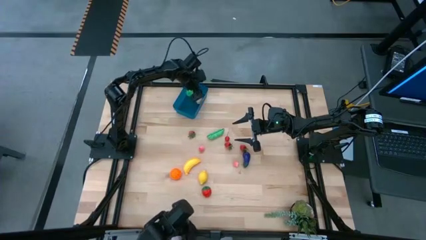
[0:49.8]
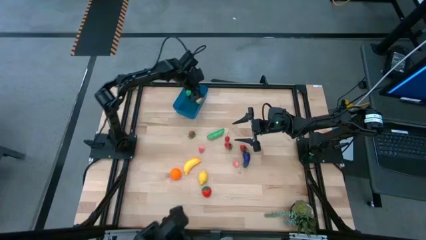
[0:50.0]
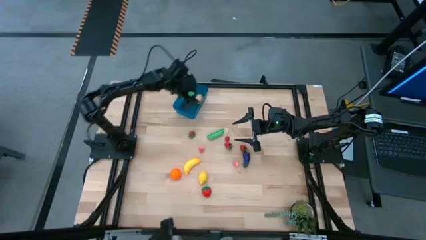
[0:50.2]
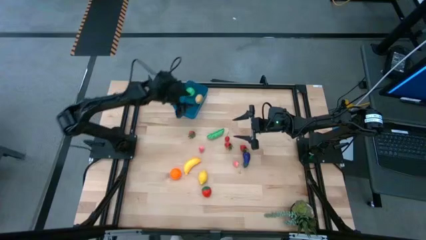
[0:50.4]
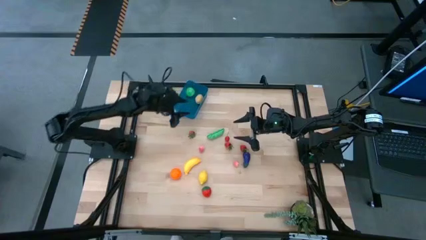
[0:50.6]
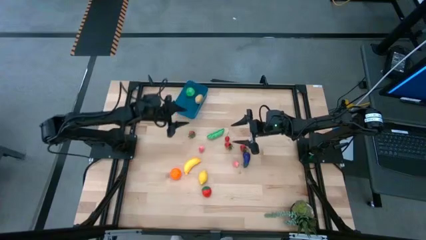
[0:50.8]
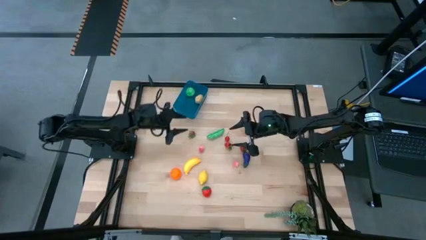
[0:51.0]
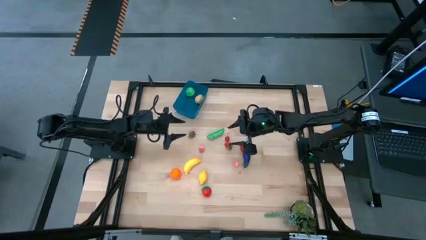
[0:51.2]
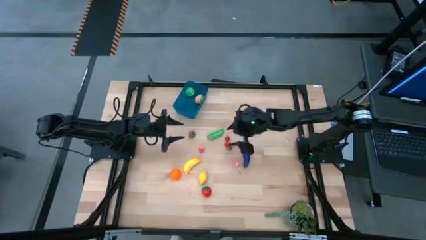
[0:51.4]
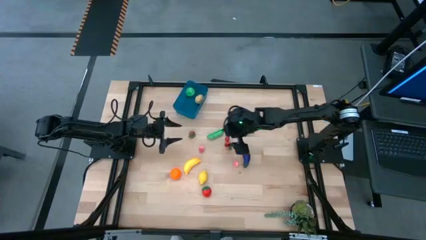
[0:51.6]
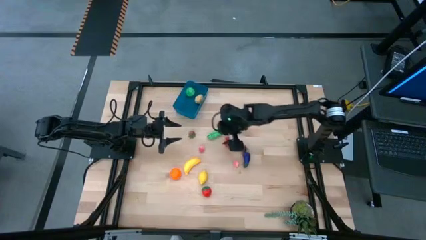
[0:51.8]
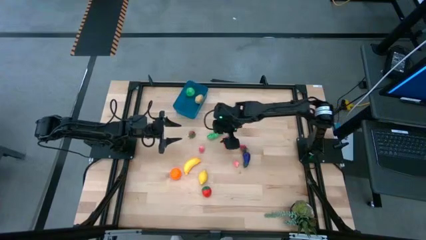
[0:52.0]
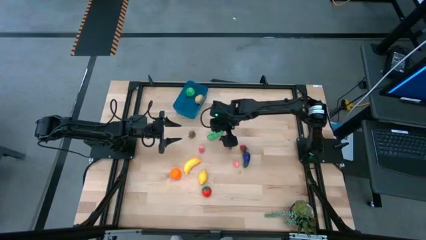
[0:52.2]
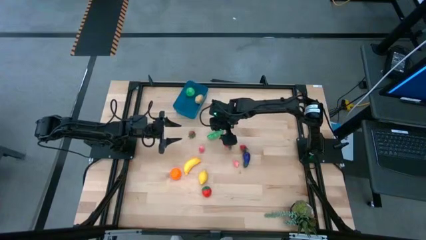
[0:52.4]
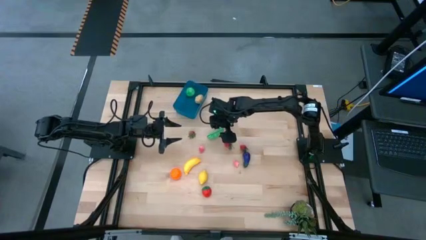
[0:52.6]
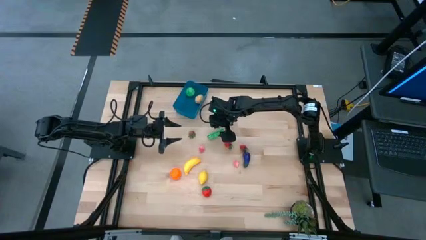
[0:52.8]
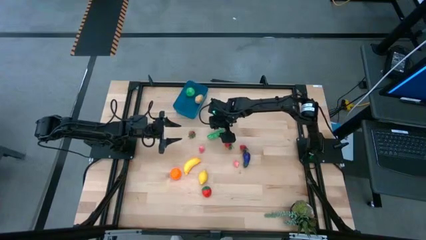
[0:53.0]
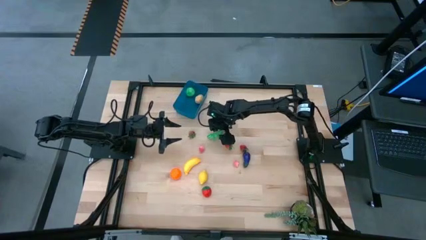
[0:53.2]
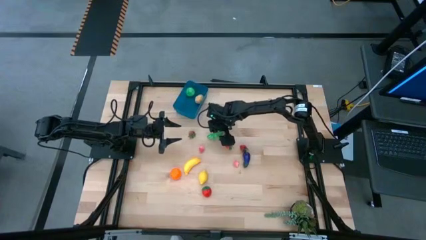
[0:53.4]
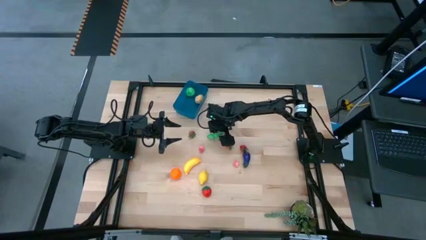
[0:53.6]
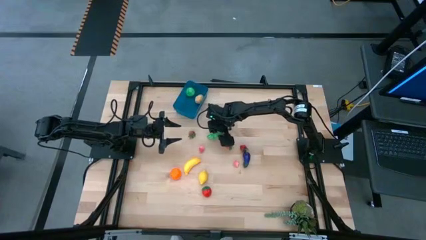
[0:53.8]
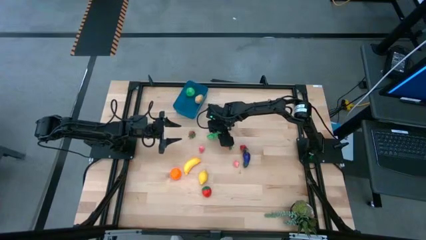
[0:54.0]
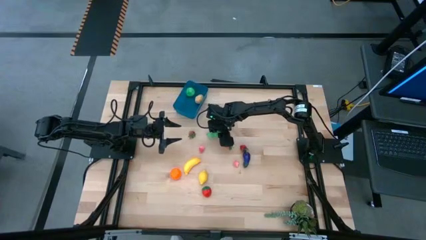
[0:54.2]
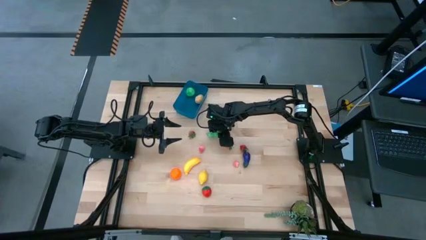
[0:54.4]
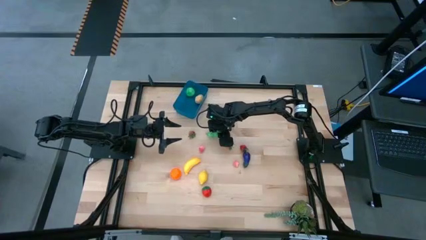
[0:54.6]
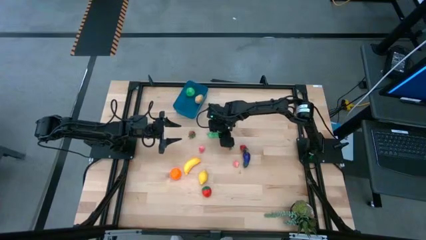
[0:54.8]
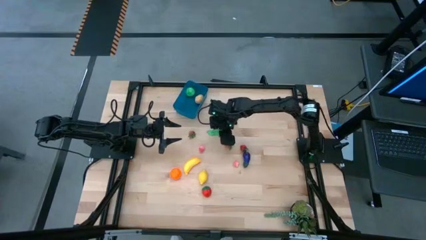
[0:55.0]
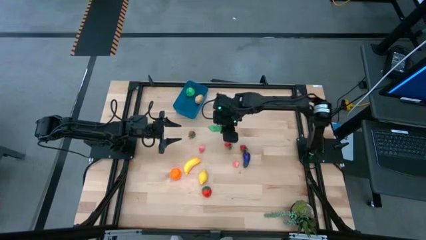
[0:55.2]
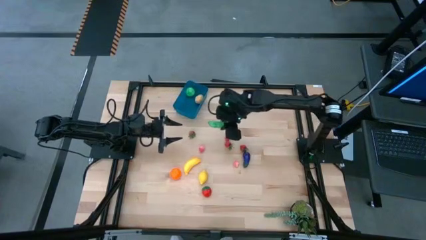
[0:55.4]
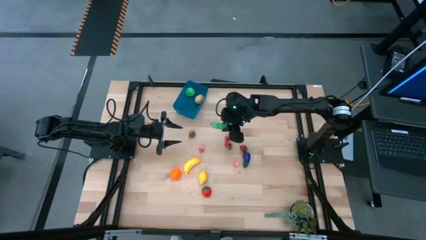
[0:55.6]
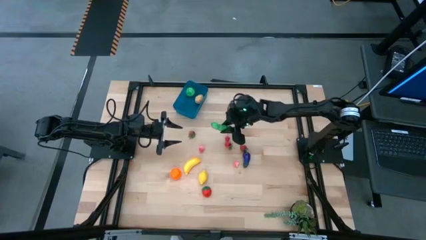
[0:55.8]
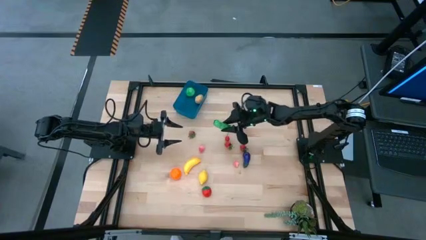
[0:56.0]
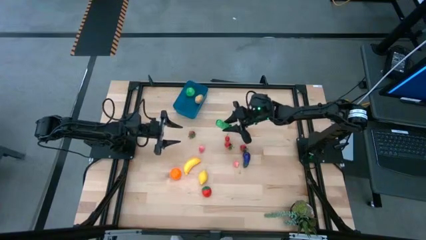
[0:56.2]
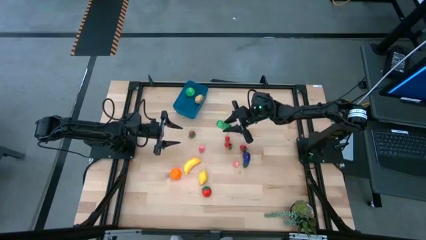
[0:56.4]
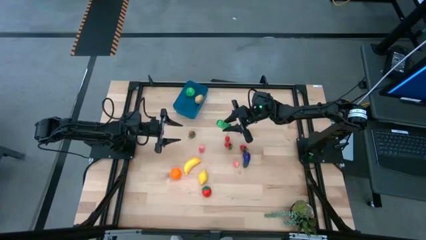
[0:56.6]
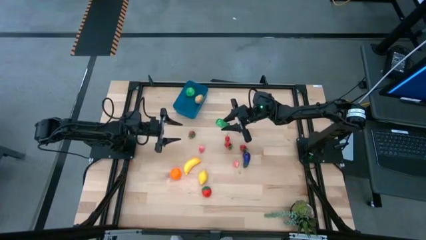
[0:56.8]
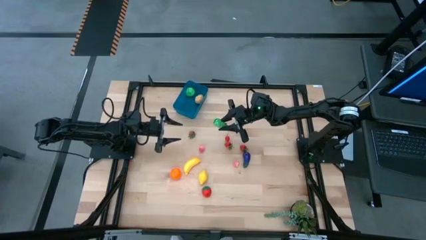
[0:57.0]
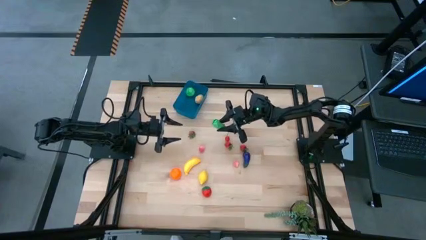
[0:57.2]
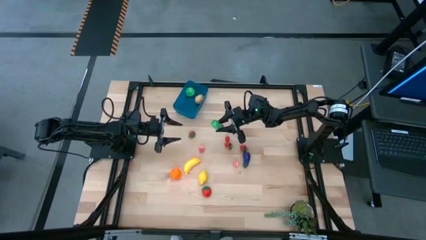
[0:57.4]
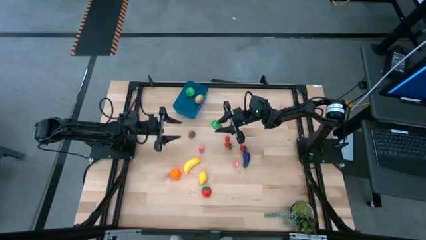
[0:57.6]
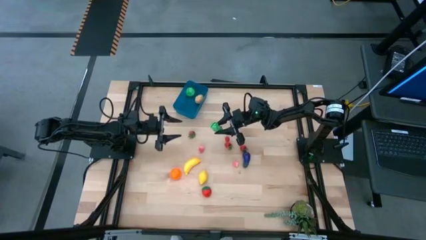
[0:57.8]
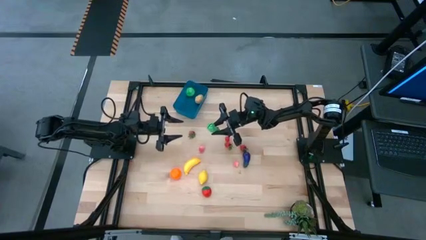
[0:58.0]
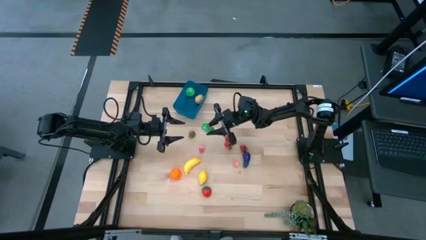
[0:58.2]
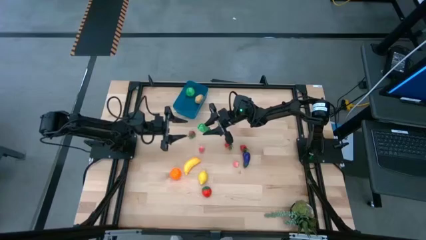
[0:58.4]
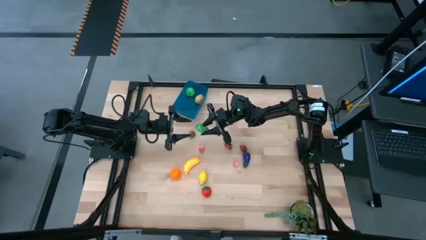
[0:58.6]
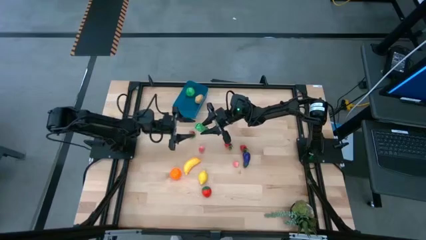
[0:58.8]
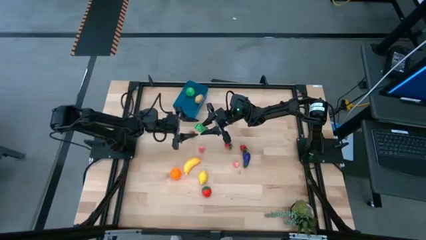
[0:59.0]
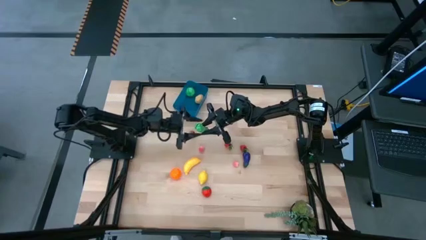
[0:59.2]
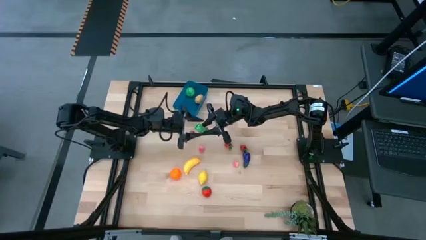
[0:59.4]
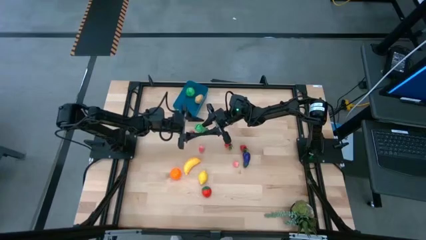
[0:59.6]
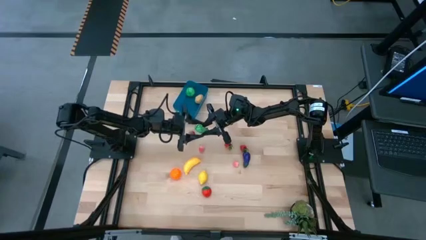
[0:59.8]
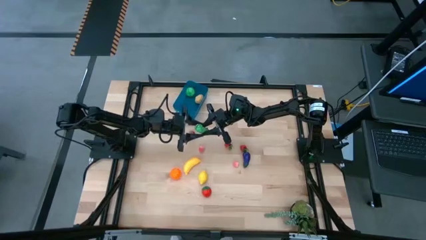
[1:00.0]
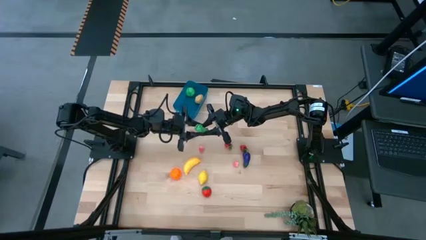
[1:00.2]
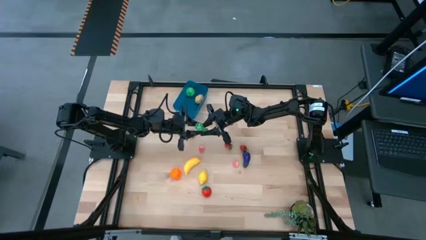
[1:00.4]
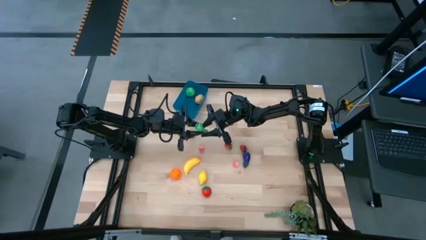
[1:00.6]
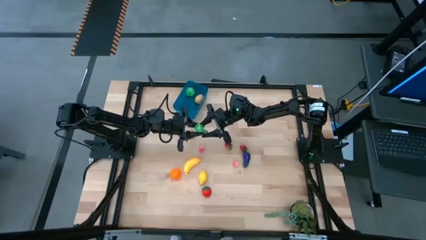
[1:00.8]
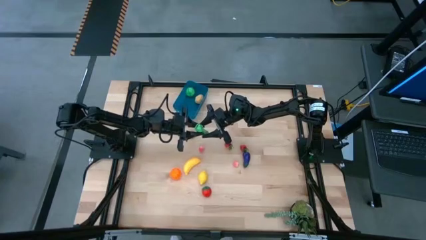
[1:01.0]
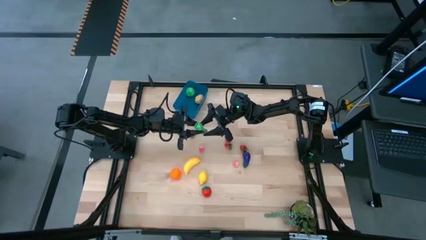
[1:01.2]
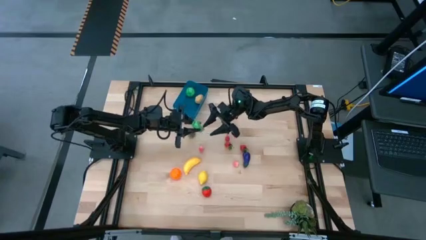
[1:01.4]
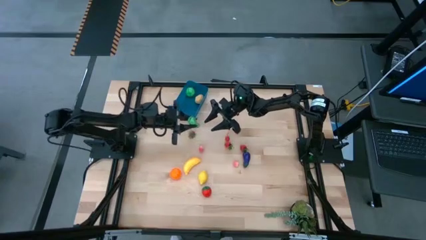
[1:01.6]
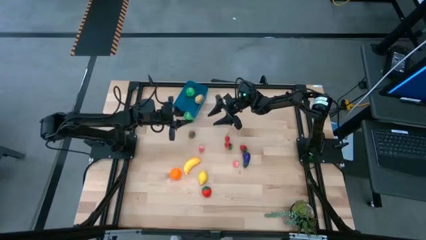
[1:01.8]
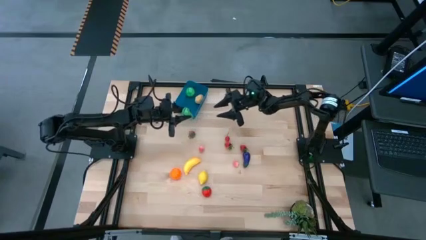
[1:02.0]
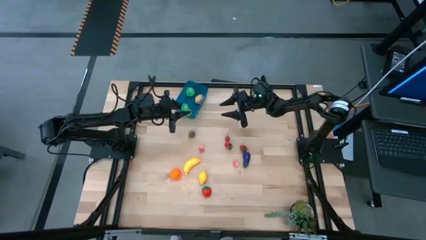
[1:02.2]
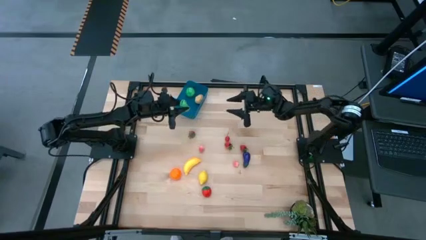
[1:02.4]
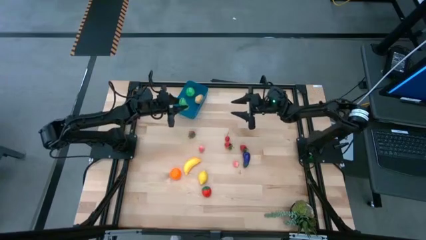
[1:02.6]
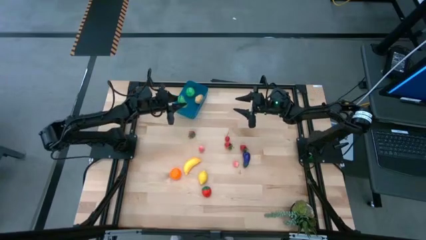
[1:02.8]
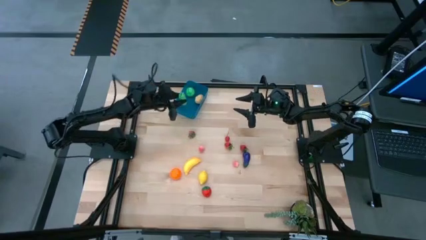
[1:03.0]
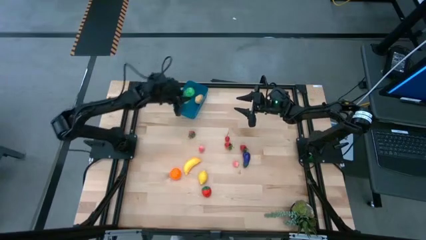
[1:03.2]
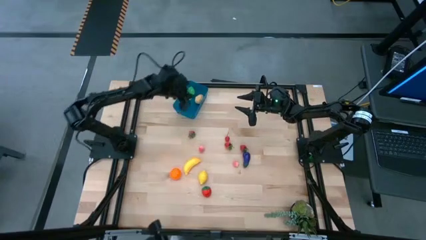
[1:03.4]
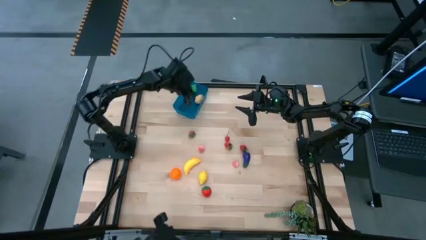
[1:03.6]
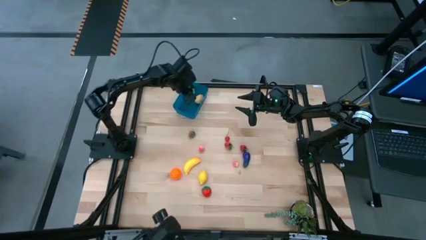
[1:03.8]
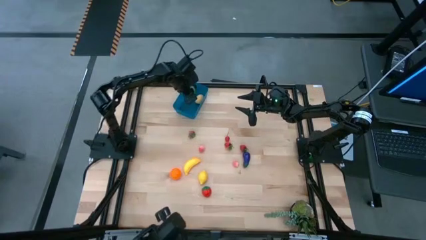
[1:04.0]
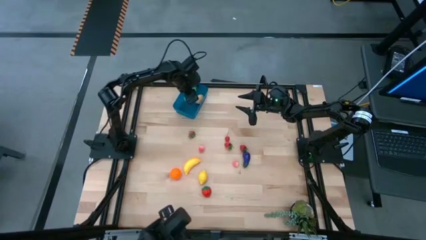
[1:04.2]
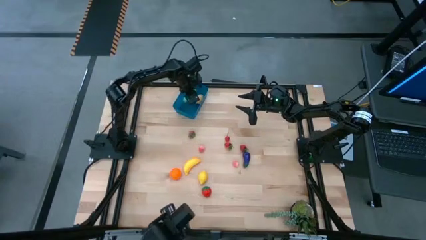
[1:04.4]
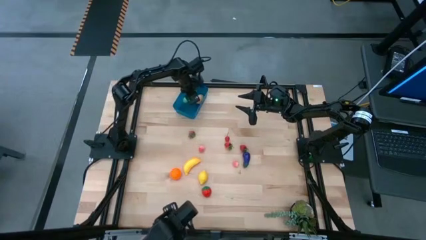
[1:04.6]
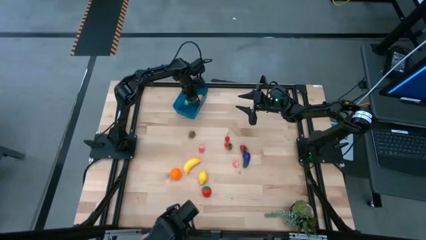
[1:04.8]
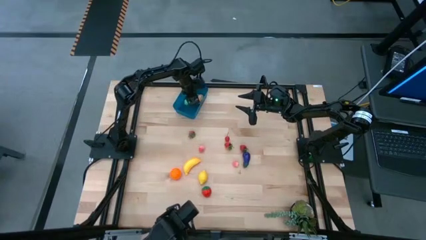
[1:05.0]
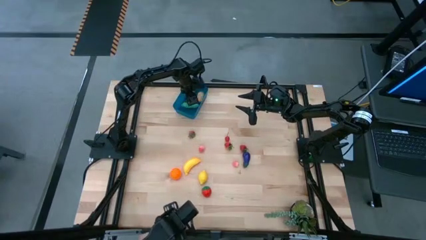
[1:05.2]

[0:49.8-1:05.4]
Task: Pick and placing Produce into tupperware
Put the green peas into the blue bin
